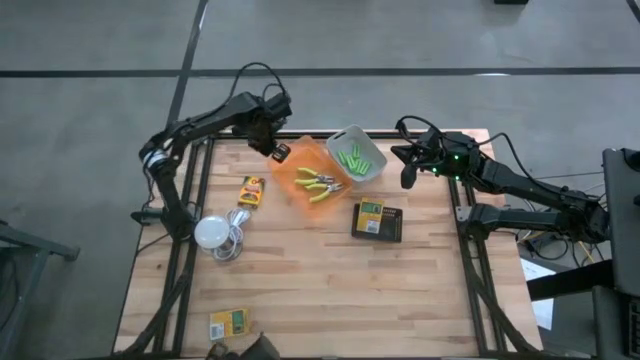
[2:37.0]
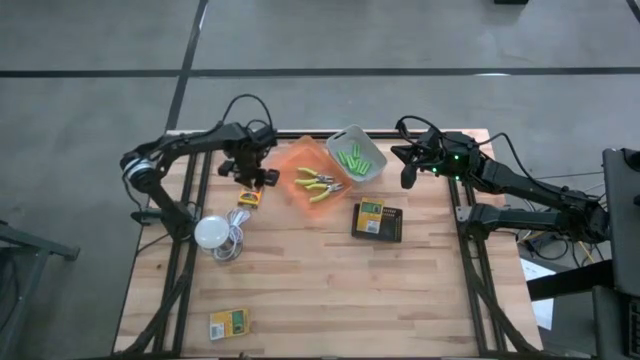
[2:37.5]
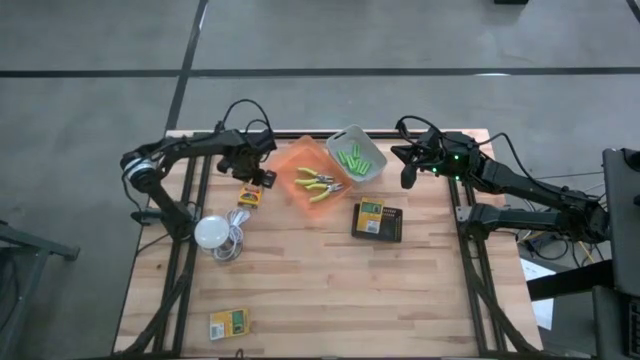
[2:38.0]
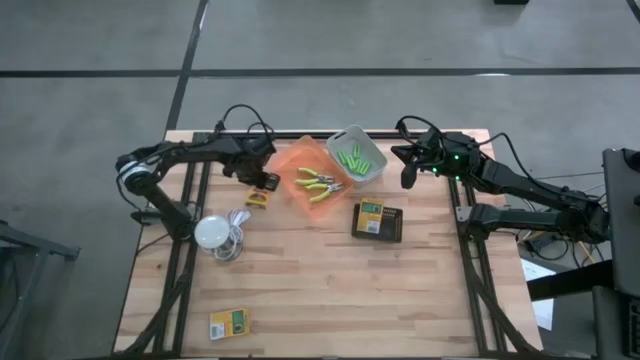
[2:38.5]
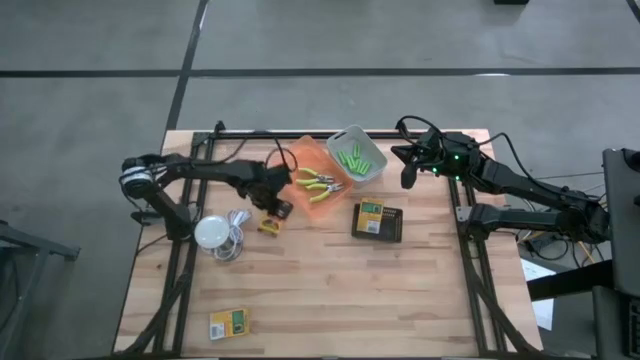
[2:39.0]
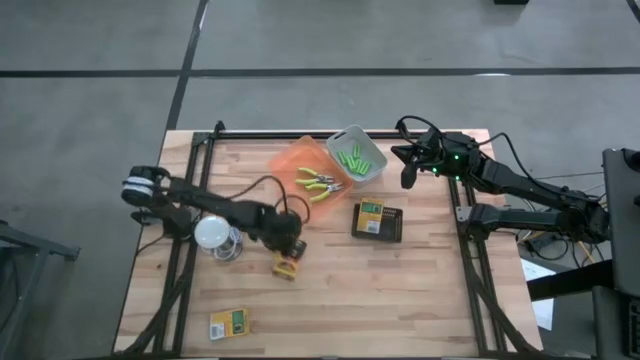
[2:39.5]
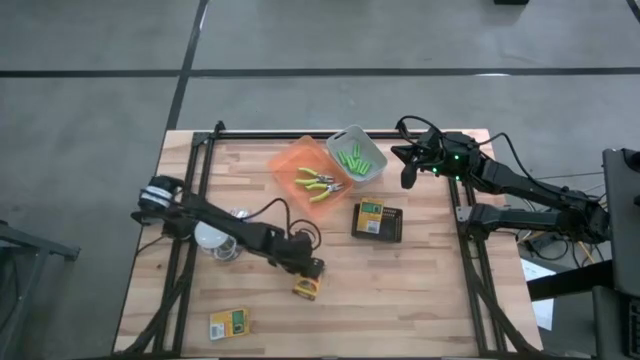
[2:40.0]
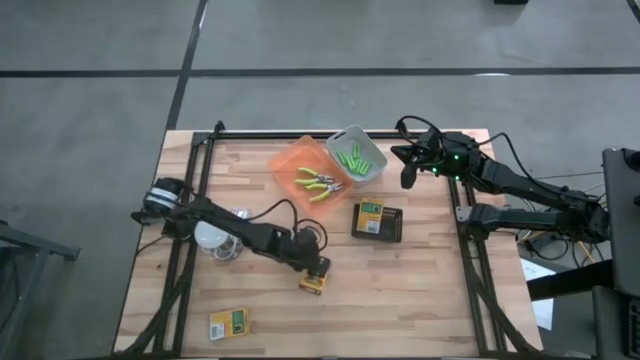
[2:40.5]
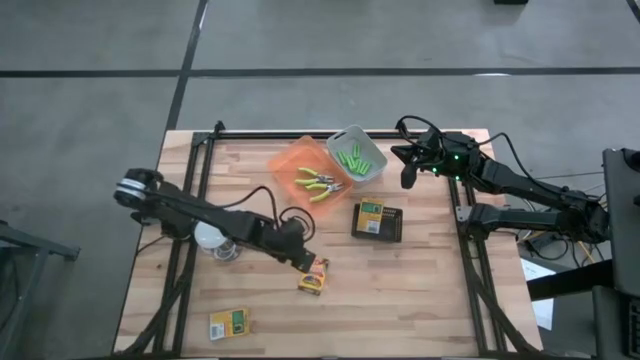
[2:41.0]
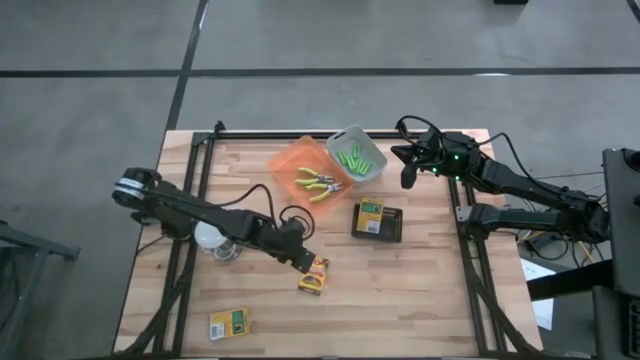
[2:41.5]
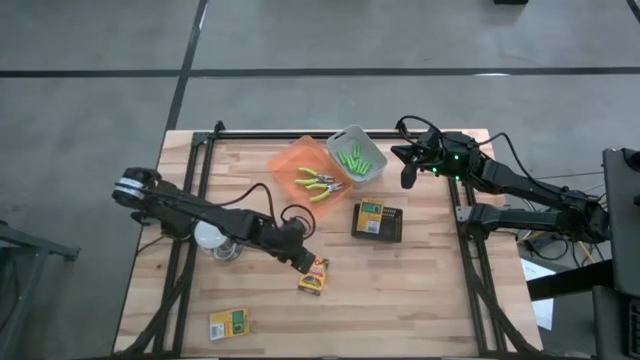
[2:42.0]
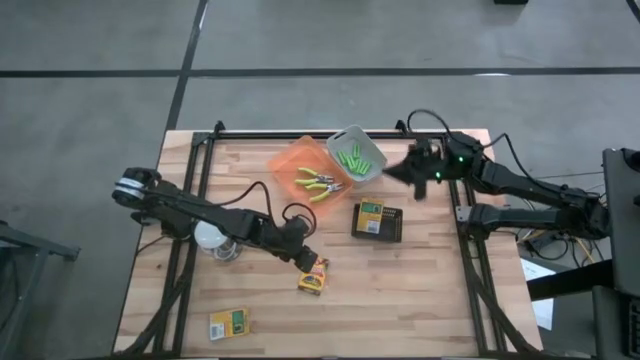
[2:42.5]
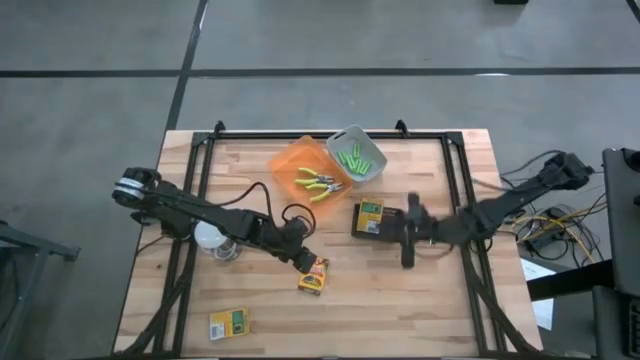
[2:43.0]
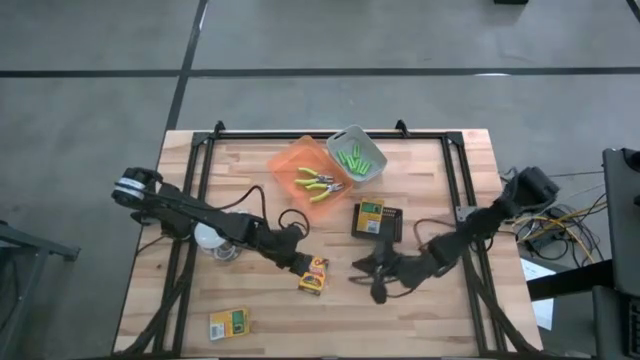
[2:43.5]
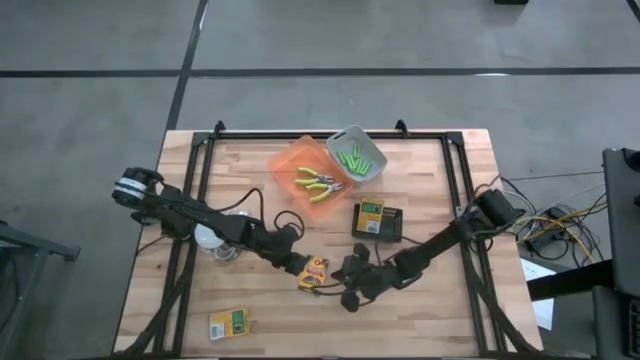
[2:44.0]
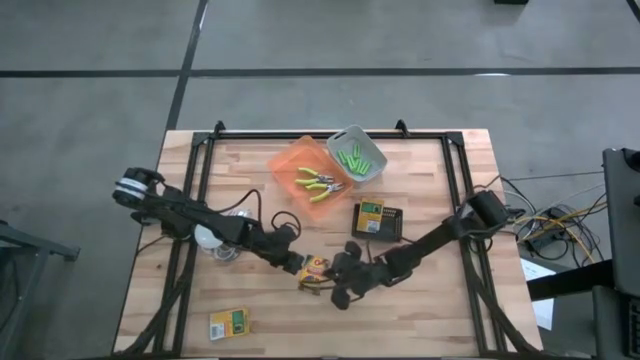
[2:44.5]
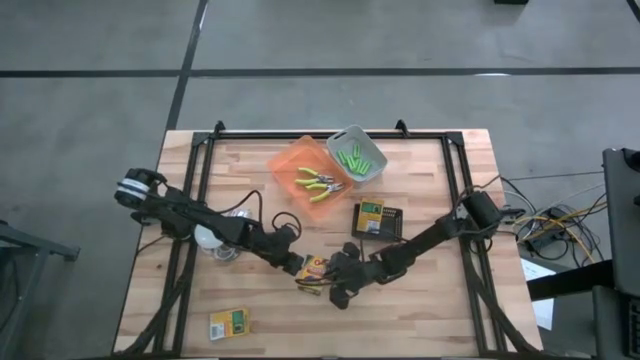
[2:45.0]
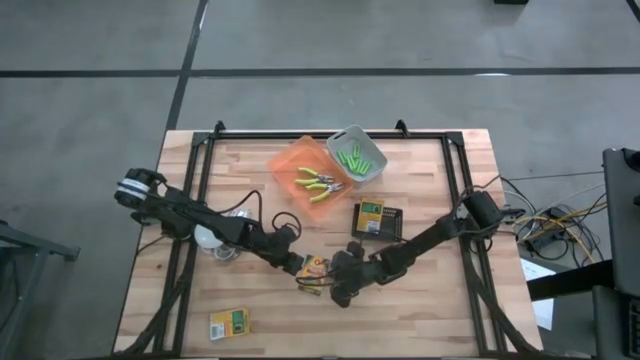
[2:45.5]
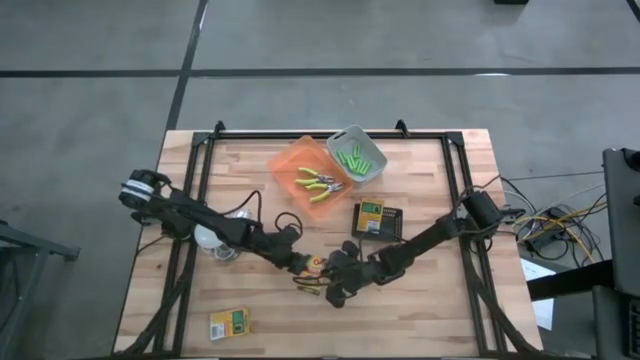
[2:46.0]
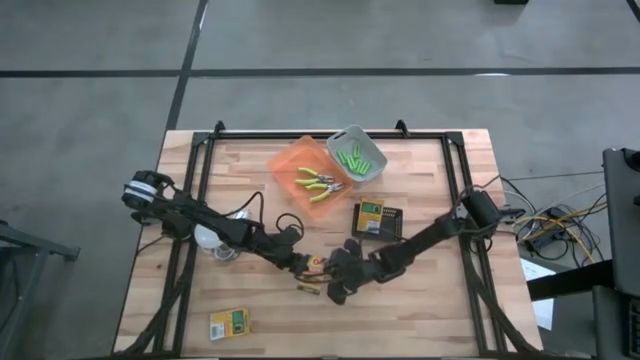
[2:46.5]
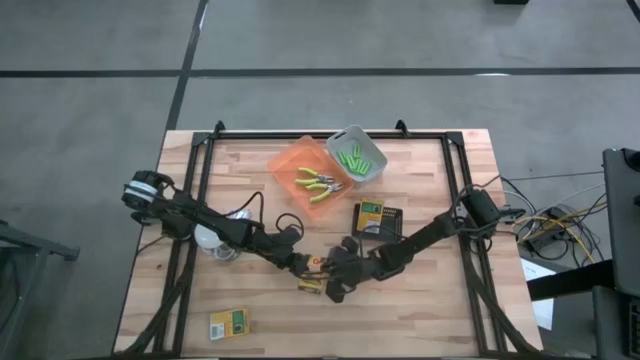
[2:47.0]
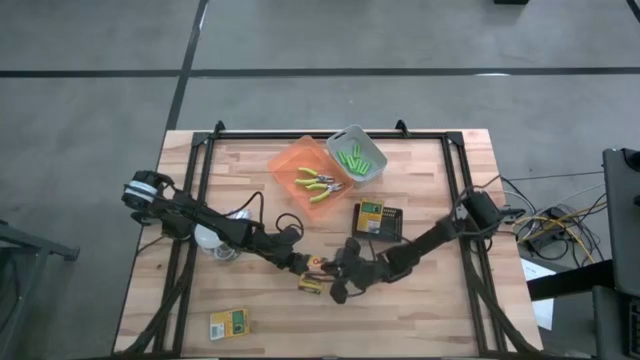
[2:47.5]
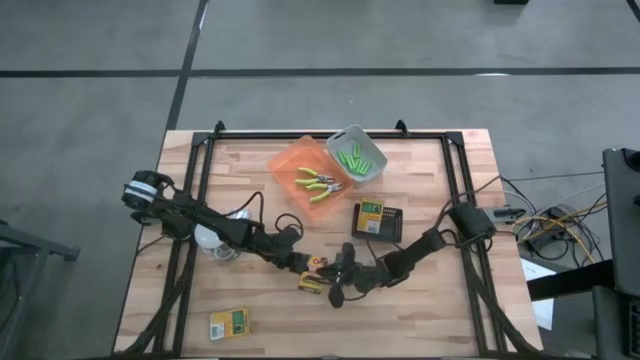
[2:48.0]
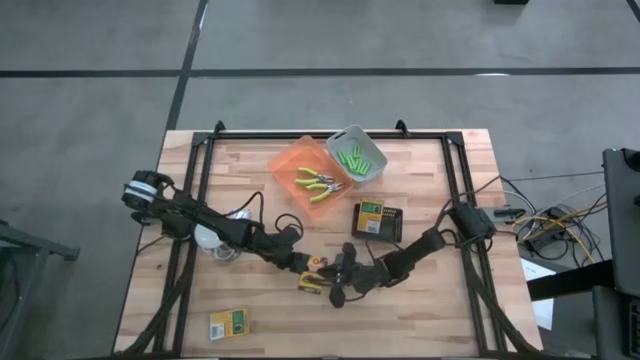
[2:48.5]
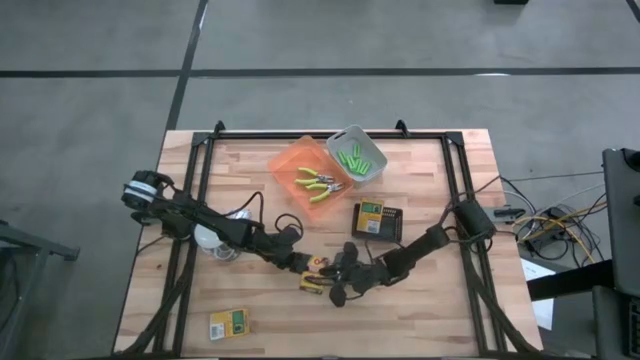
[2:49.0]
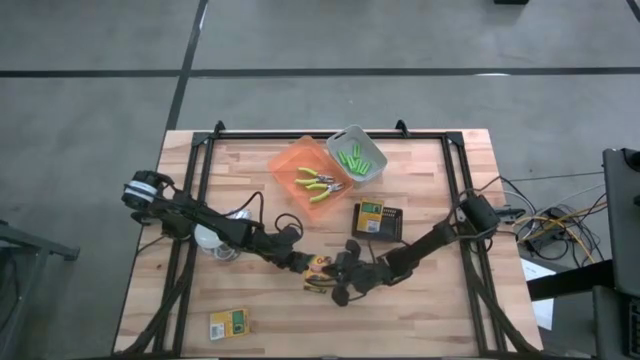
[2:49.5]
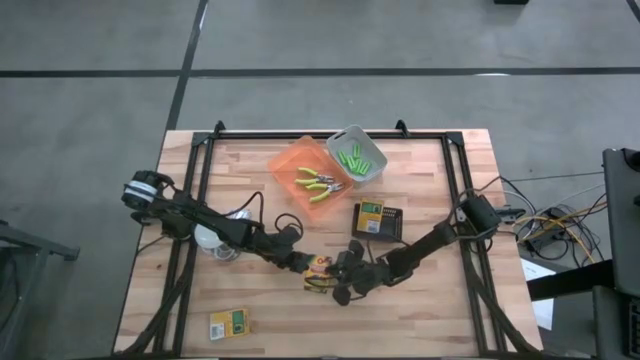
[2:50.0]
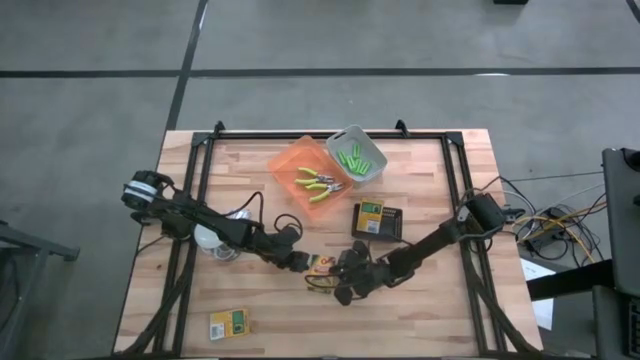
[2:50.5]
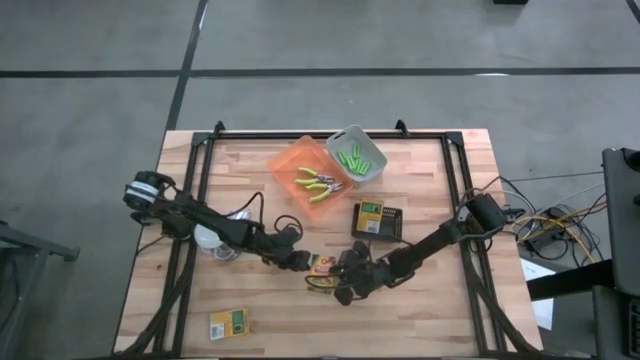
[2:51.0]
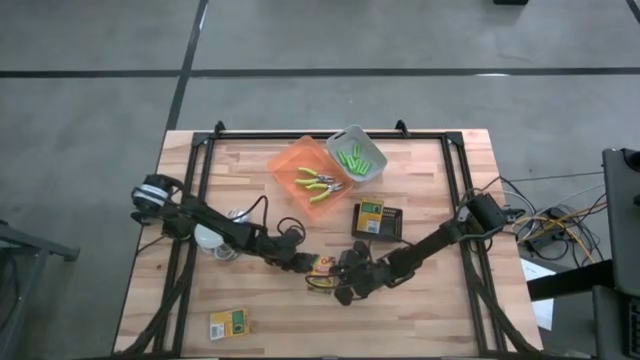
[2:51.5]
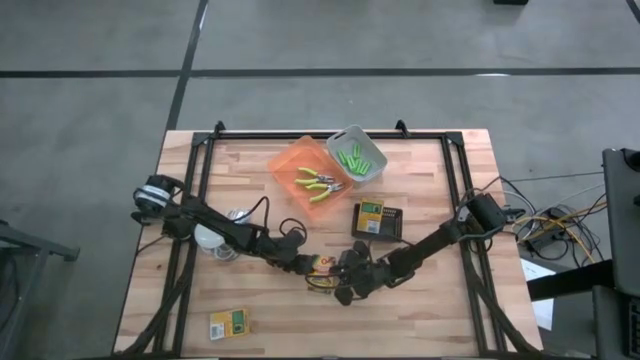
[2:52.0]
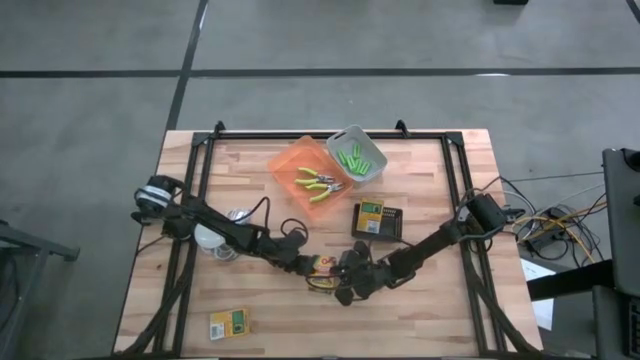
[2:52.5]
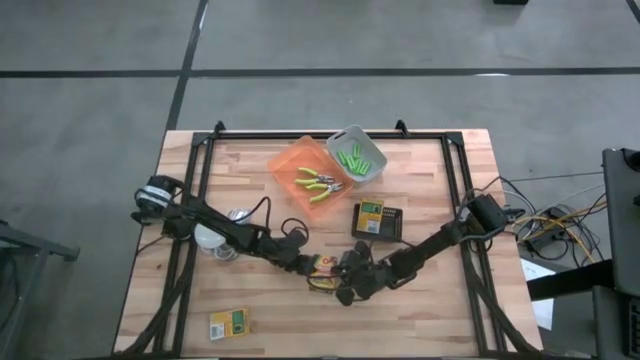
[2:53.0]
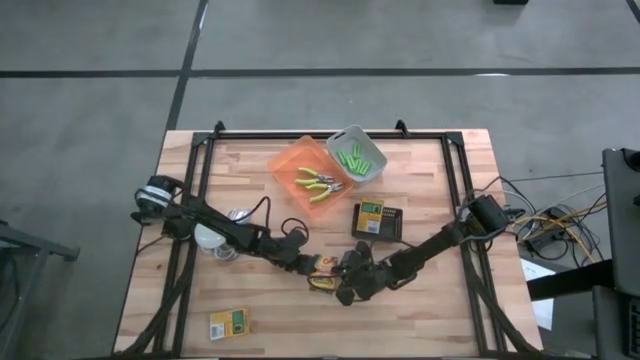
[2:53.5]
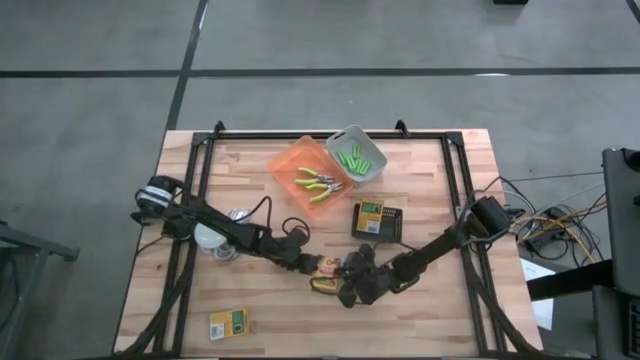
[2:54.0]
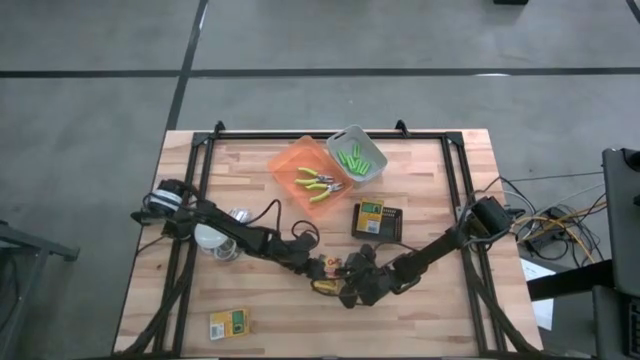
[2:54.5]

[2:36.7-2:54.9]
Task: Pick & Place School Supplies
Put the yellow crayon box into the black bin

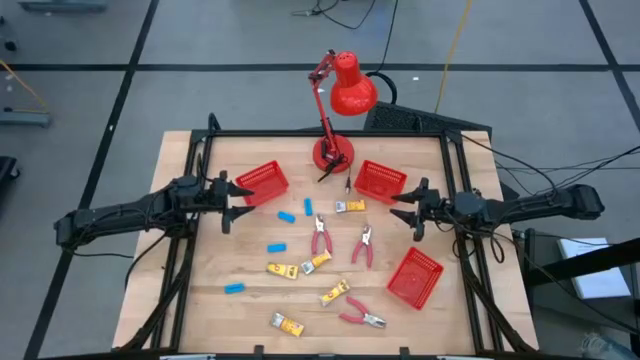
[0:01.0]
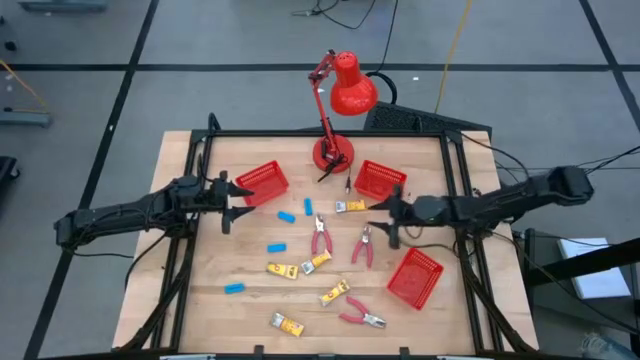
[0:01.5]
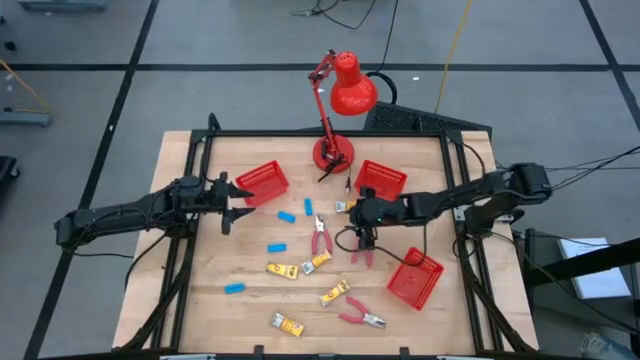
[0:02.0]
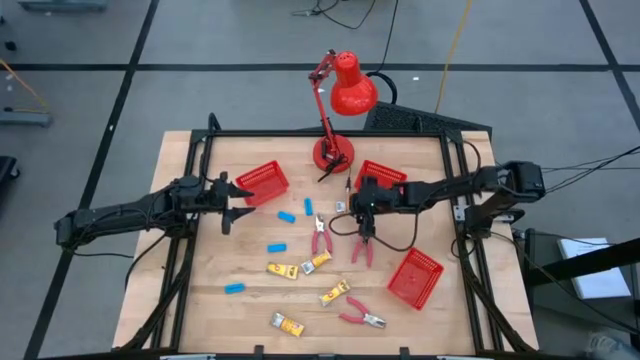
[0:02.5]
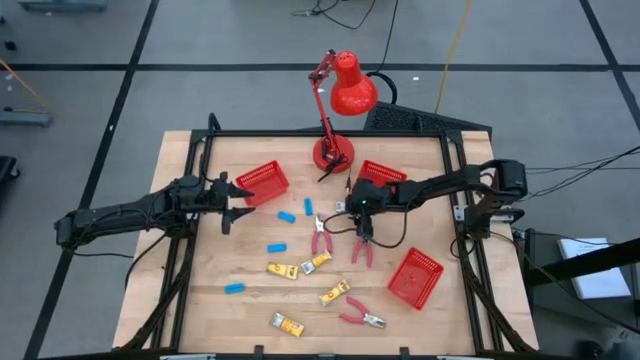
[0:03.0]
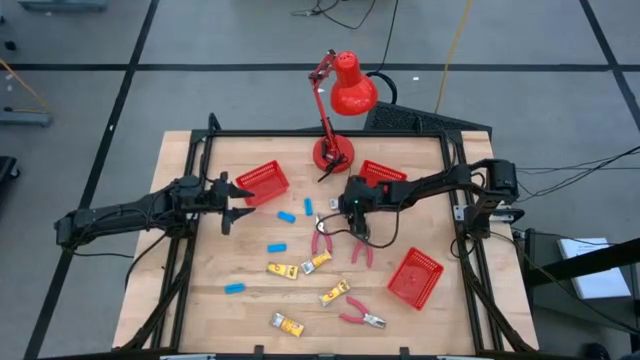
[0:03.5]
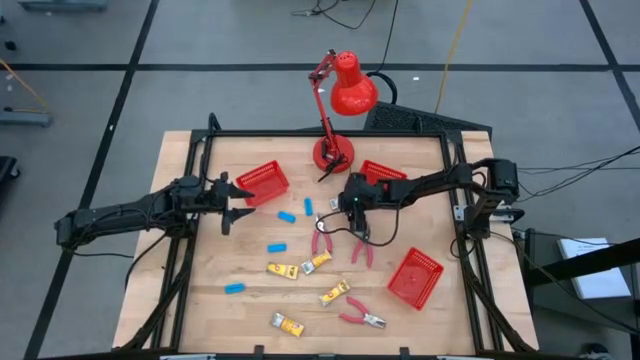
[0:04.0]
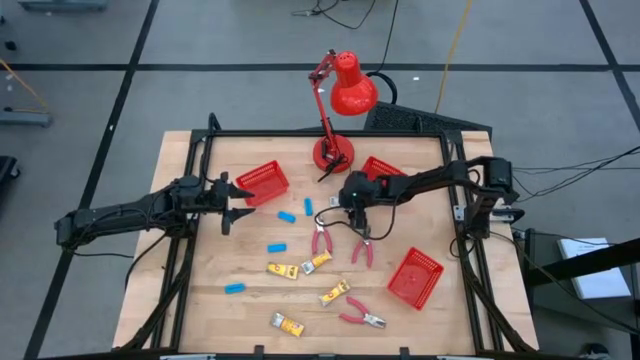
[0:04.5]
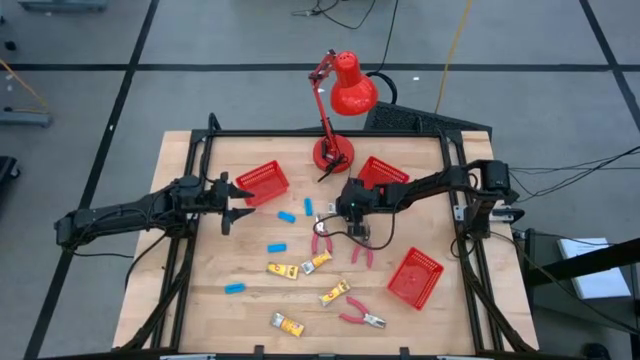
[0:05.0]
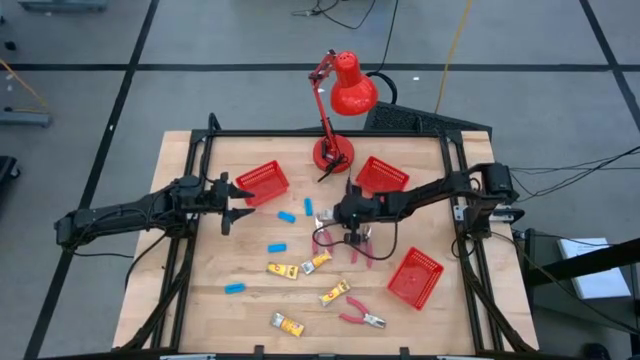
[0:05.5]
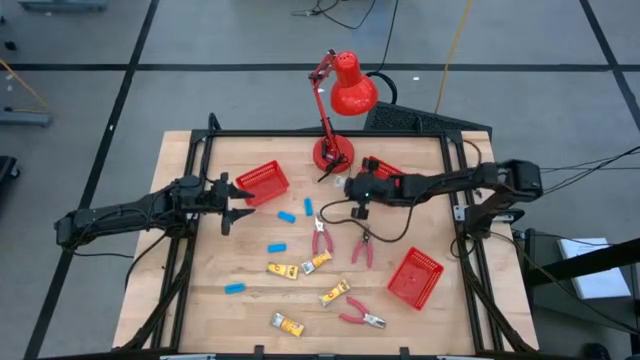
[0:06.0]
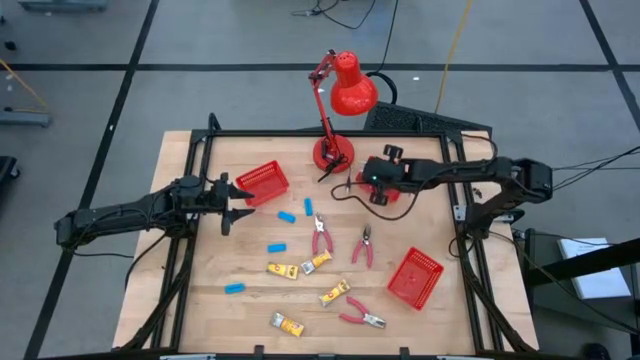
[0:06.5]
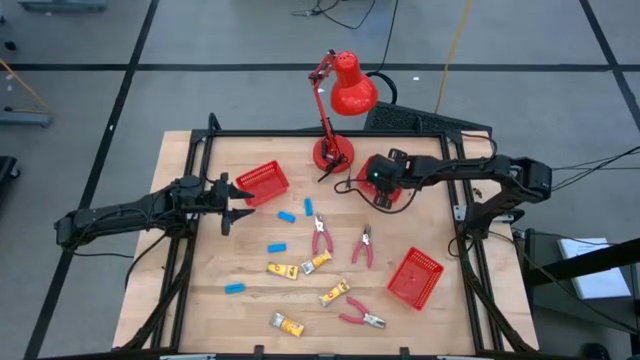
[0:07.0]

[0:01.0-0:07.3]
Task: Pick & Place School Supplies
Put the yellow crayon box into the top right red bin
